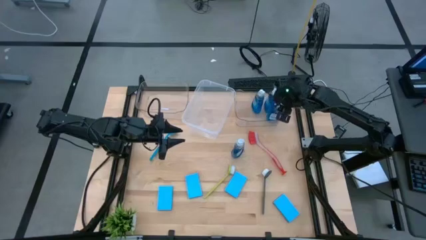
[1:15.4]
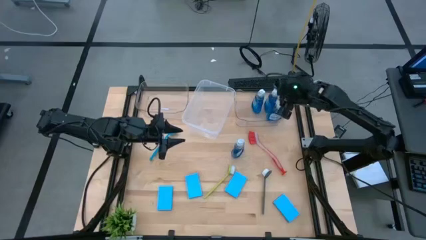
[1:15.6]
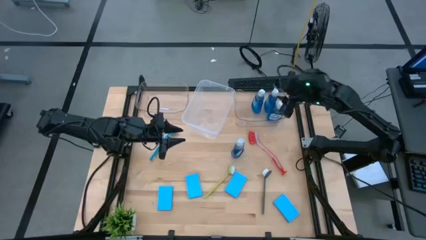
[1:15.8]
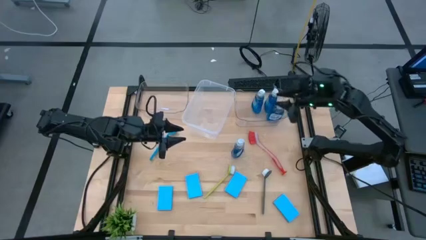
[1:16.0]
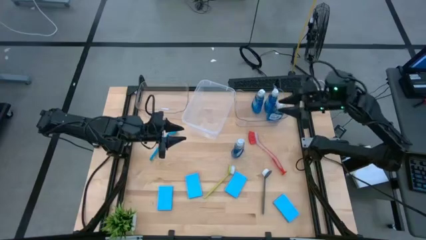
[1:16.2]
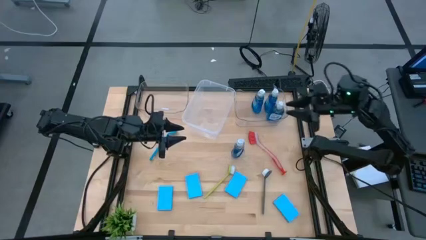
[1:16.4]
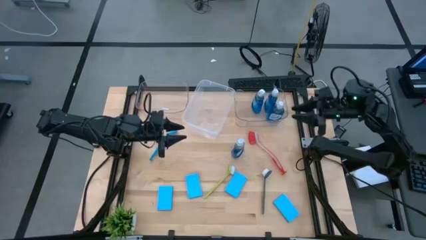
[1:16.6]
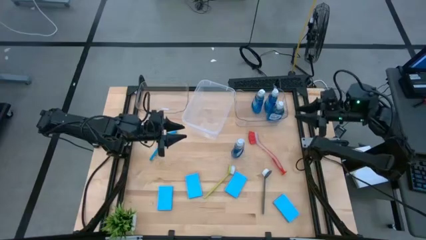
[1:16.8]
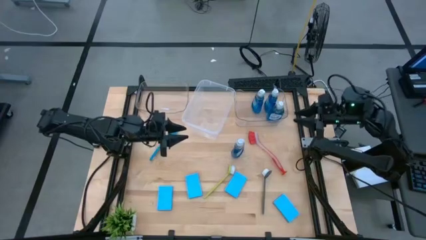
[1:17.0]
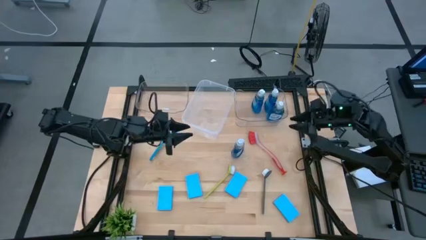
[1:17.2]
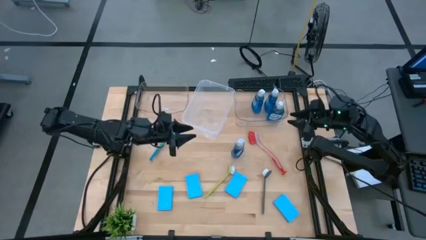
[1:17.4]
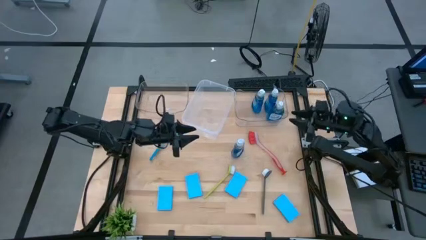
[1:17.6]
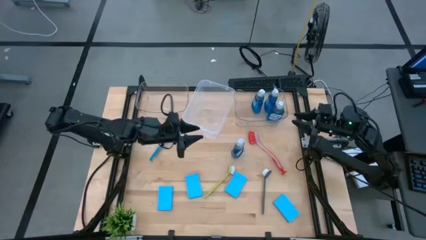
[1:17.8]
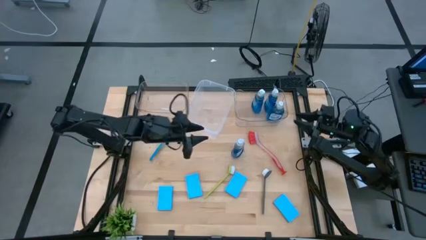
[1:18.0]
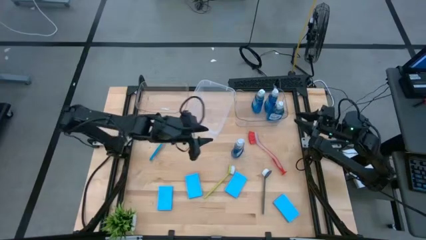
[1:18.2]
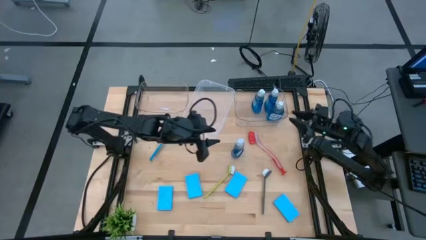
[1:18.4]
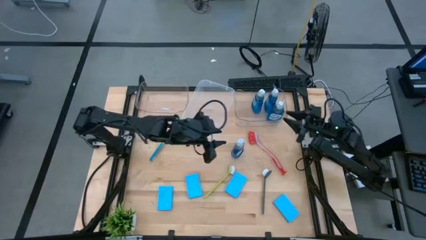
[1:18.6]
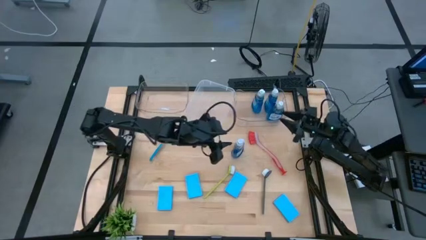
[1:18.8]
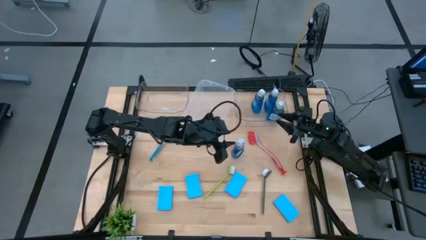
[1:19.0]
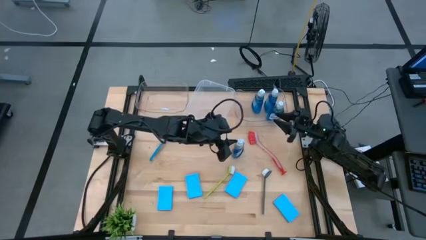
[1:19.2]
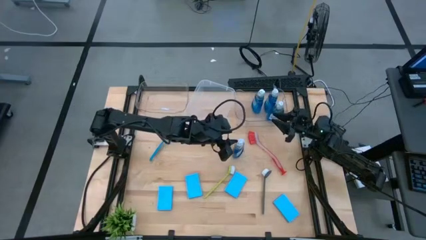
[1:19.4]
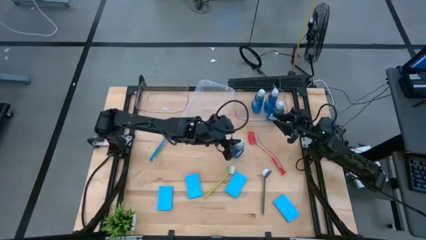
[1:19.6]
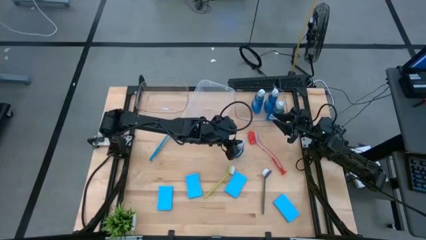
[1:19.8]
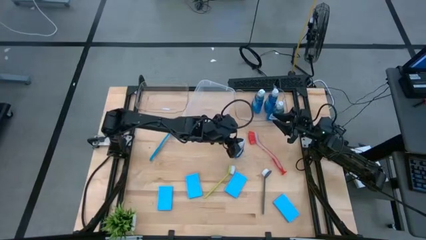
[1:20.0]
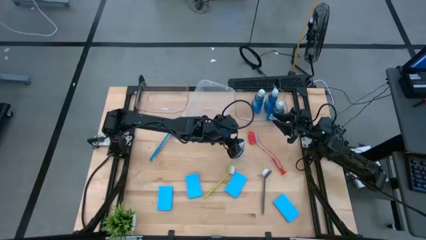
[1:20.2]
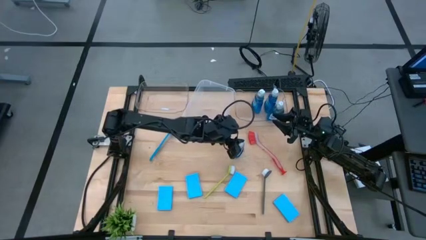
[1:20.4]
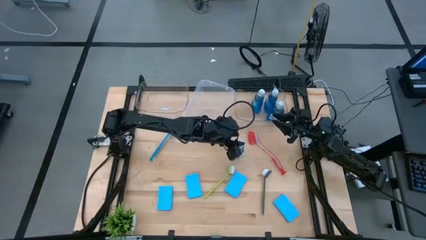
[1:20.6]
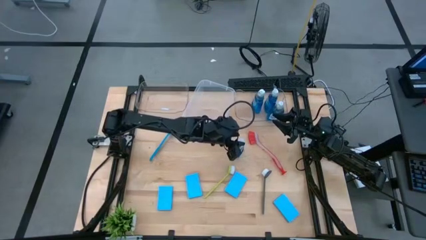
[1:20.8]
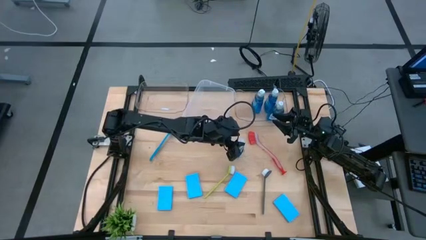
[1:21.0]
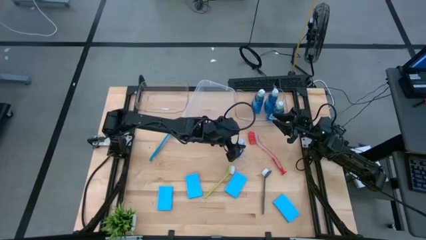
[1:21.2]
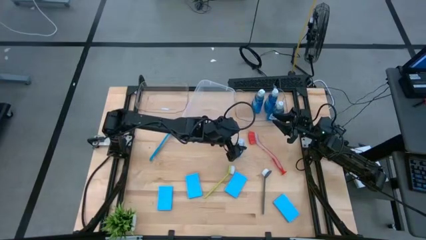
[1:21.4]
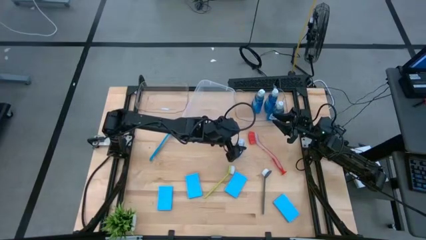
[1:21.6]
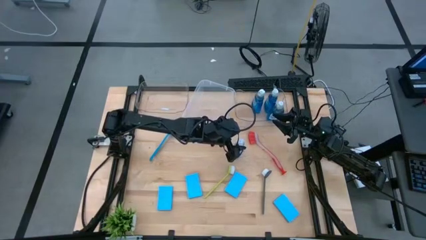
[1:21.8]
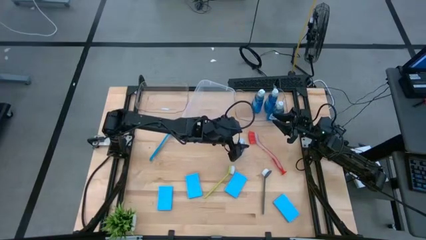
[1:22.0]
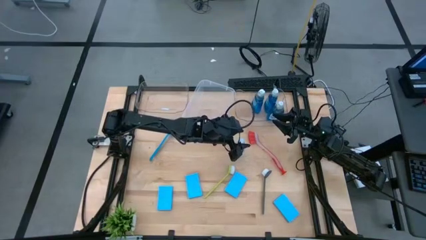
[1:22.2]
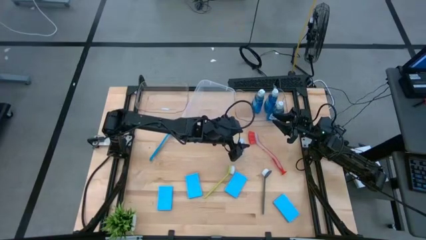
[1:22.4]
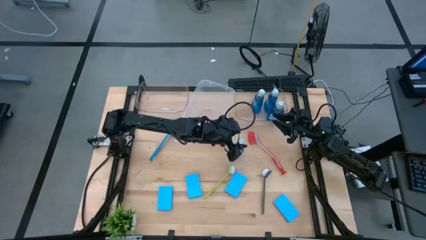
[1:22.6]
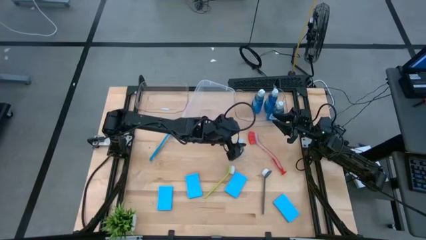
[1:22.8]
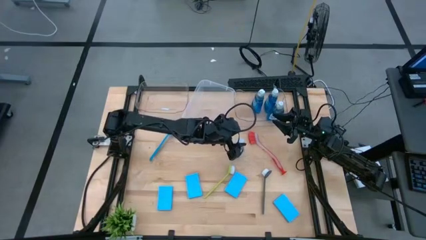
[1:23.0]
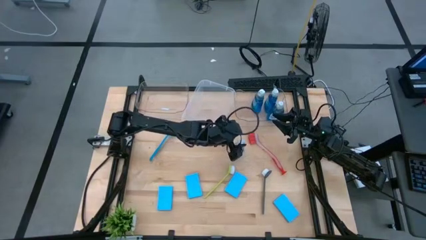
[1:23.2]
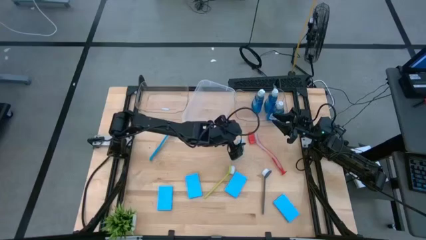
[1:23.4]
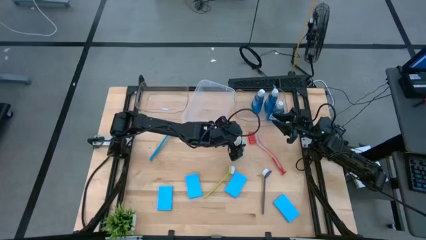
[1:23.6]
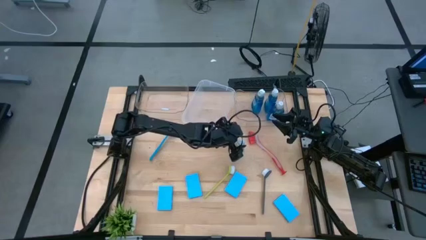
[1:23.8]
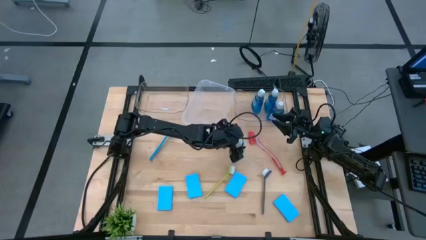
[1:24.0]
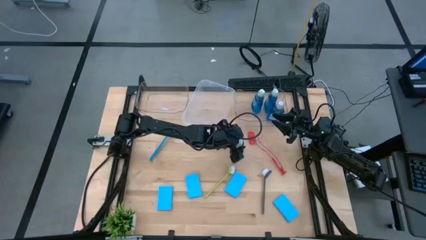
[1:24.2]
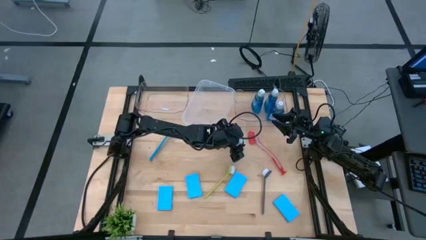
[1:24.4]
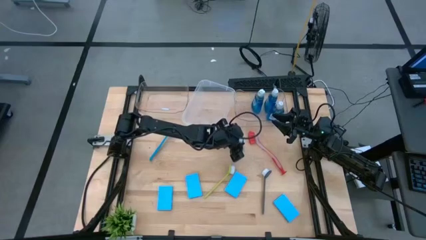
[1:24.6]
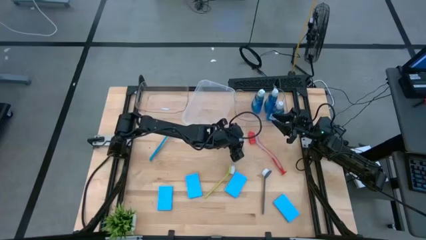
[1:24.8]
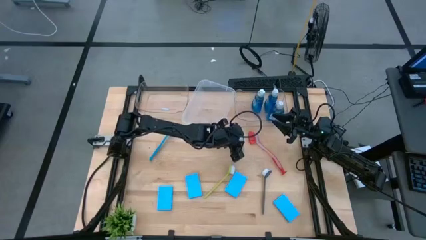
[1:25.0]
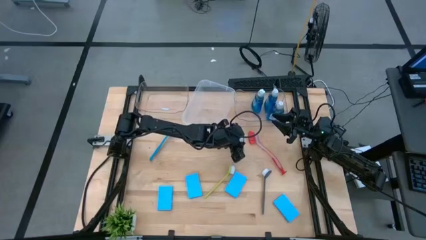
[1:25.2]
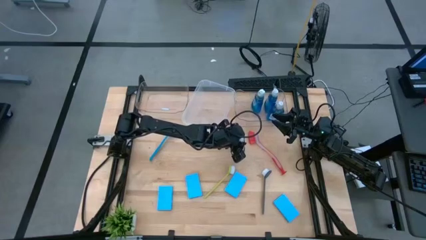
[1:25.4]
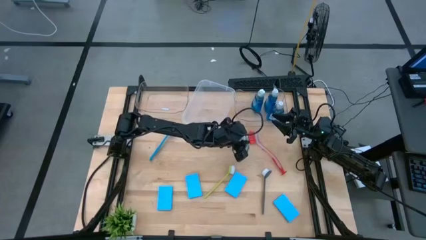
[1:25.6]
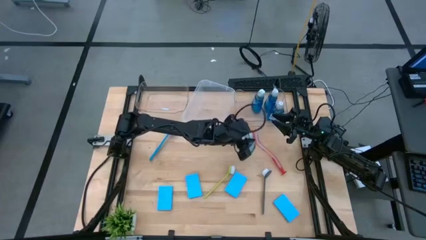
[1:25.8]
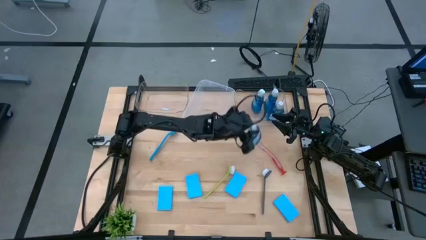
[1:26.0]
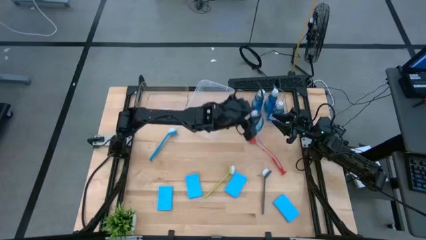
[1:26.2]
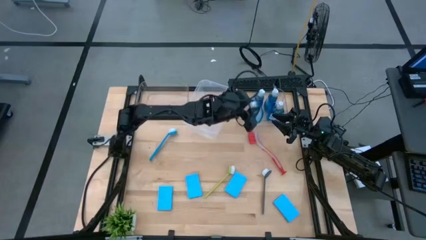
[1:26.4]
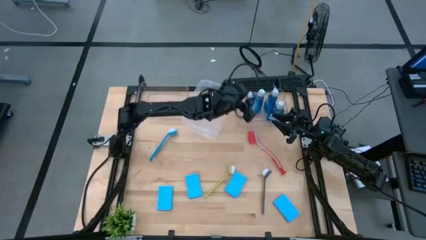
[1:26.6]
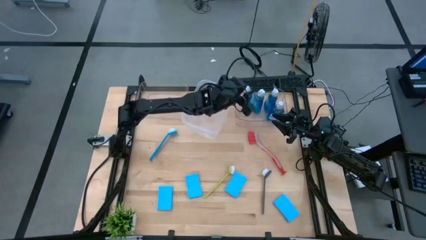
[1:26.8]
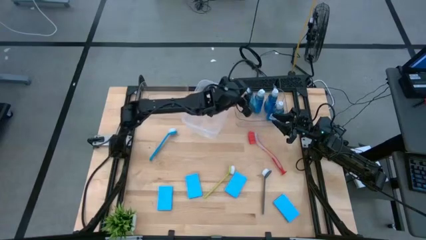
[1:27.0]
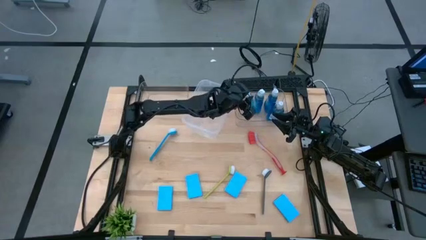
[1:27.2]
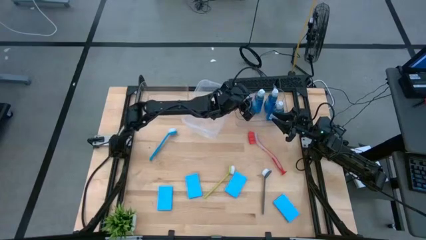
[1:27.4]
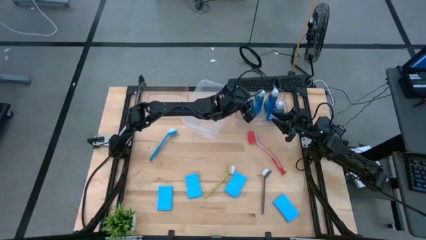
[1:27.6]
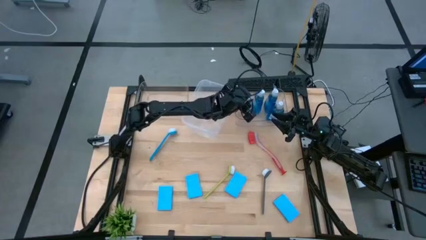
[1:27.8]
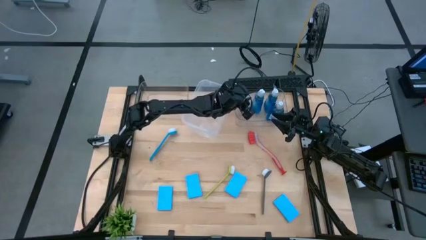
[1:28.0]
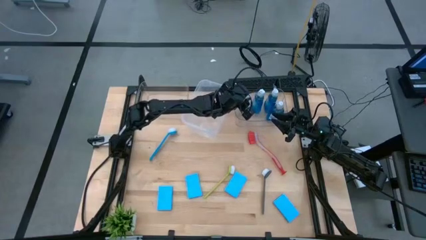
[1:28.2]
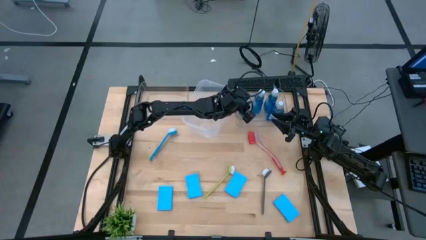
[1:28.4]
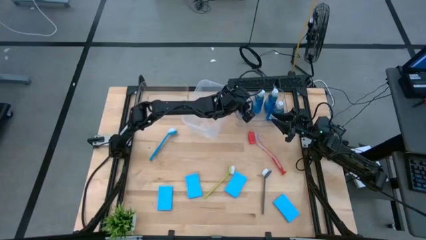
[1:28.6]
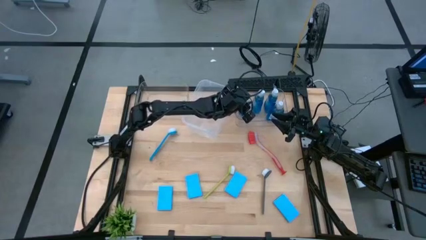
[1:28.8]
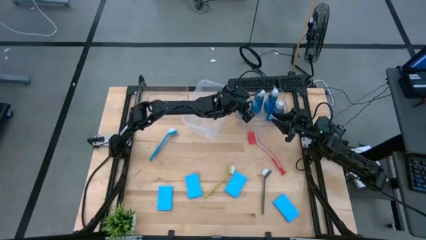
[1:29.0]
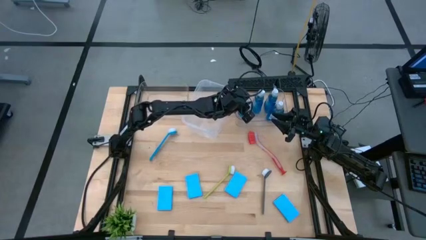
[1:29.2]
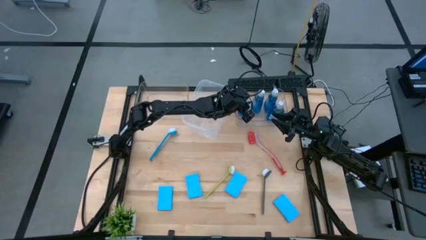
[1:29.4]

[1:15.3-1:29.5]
Task: Pick & Place Kitchen Sink Supplies
Put the blue soap dispenser into the right transparent bin

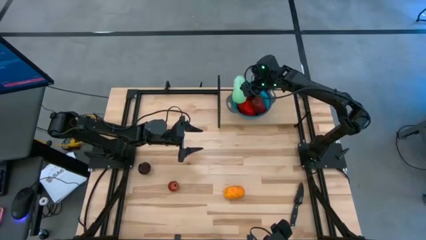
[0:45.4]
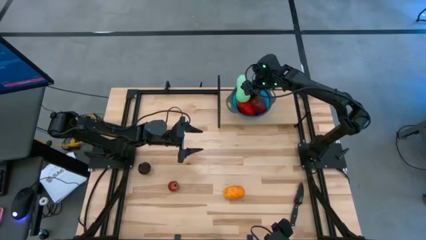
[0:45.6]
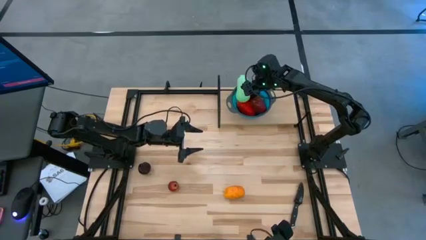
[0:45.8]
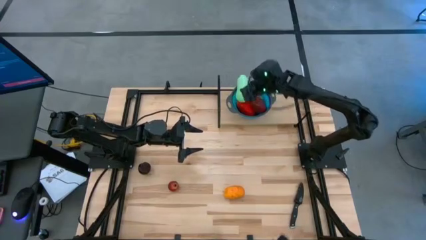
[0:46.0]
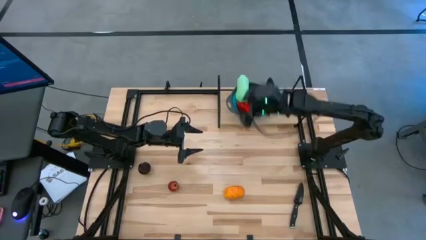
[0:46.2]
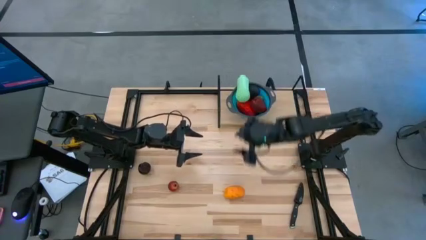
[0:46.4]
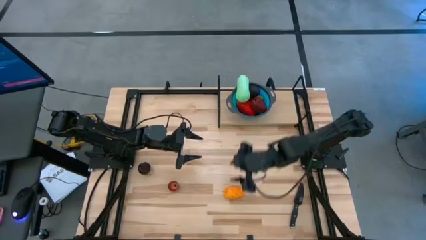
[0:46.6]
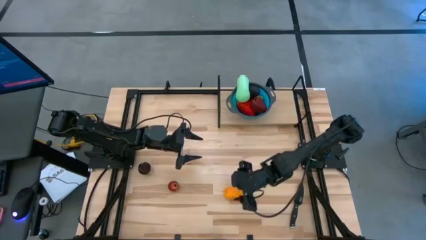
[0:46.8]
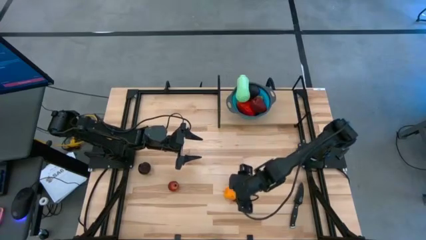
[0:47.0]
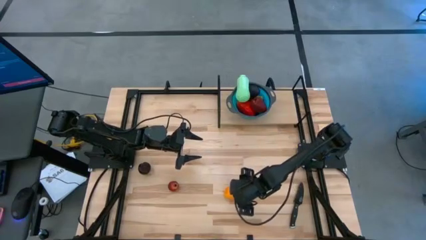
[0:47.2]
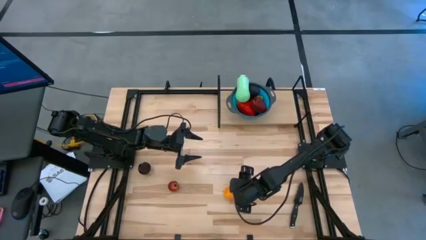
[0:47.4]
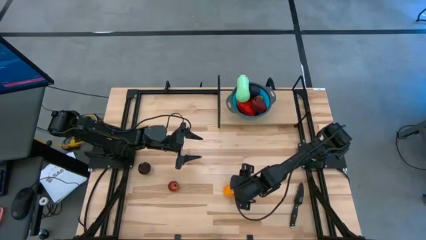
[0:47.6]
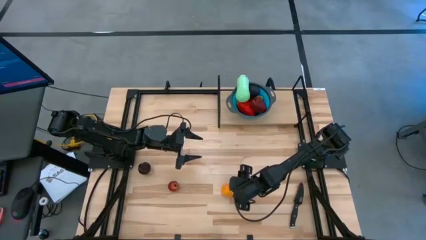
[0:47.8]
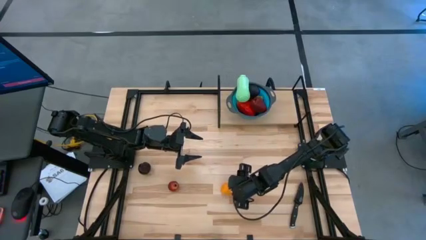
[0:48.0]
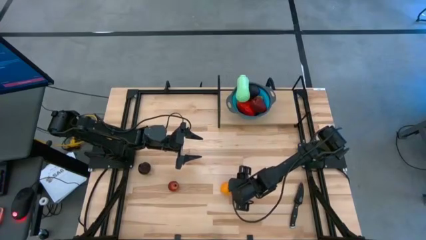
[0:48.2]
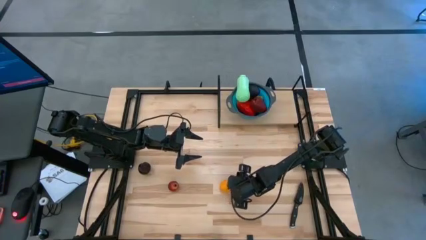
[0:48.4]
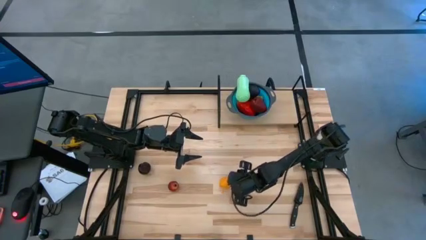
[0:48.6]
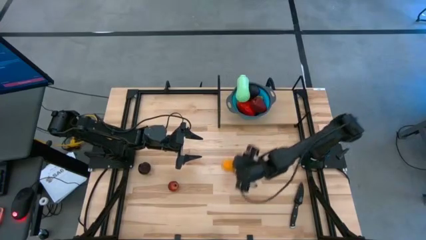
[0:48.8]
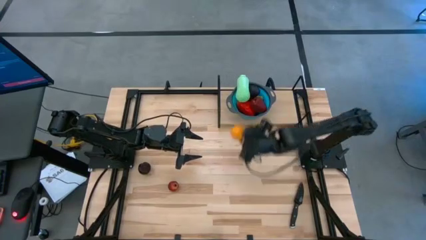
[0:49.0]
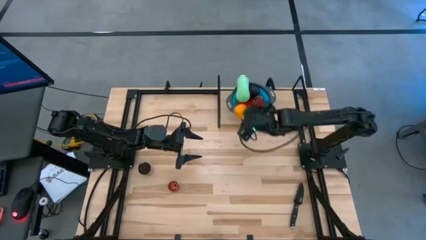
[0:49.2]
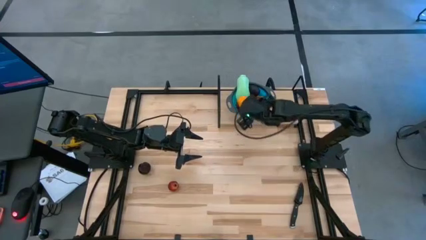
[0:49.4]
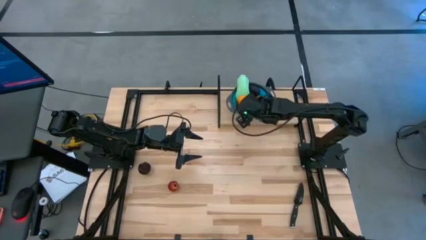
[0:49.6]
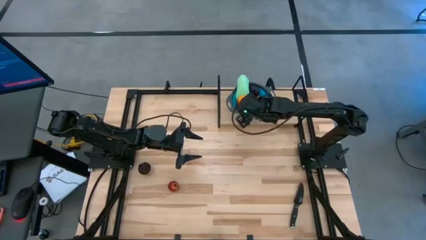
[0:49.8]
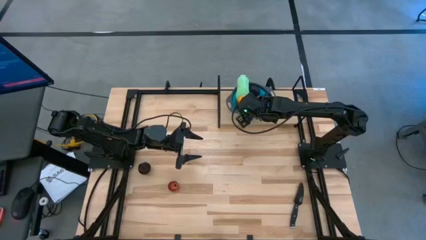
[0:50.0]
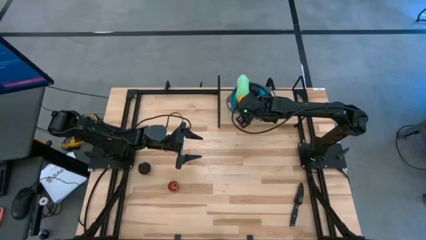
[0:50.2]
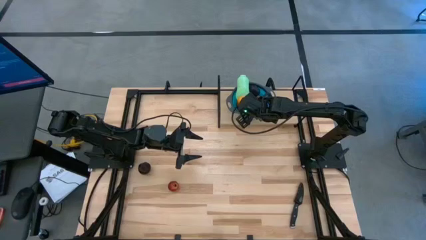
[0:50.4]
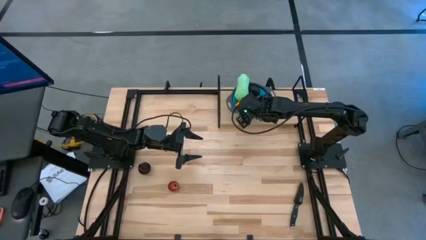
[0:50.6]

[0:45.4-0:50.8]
Task: Pick & Place Fruit
Put the yellow mango into the blue strainer bowl on the shelf
